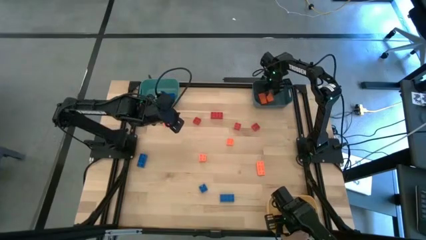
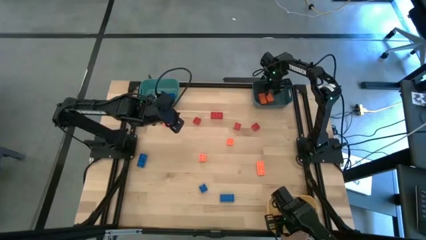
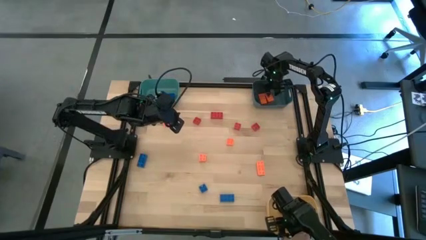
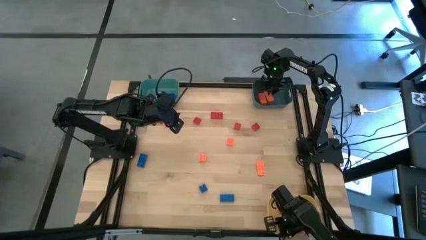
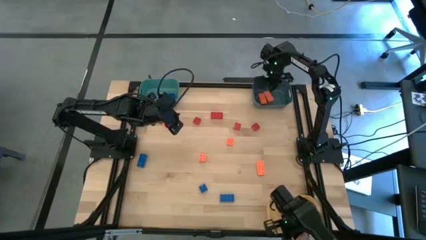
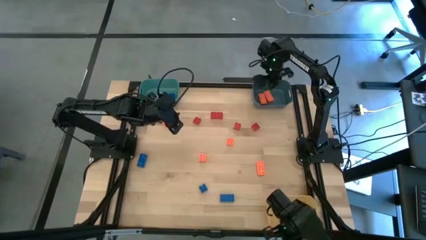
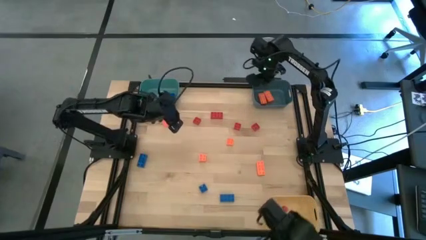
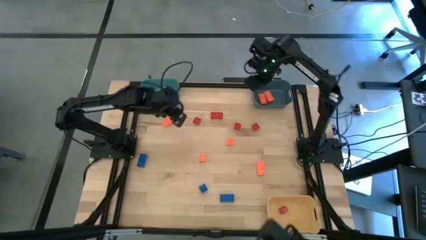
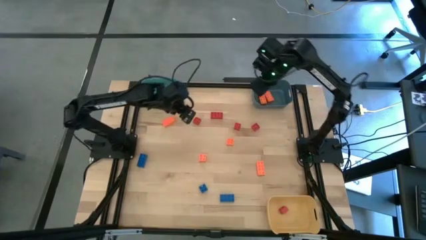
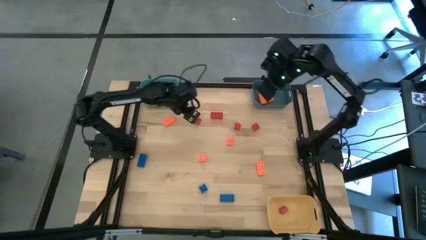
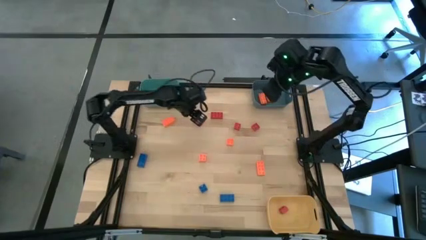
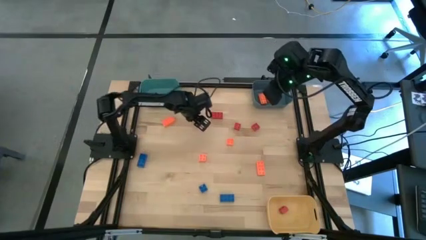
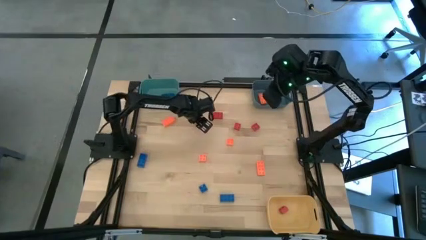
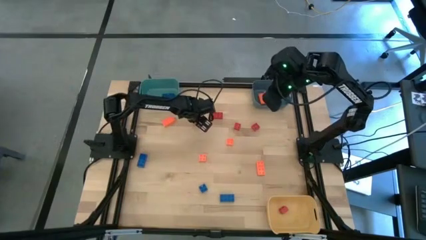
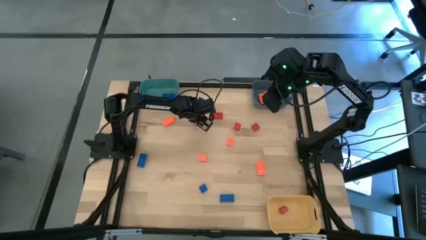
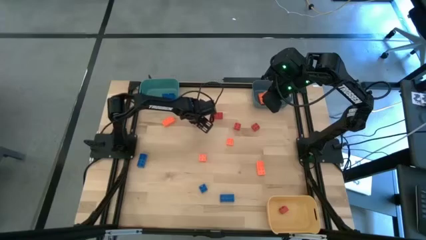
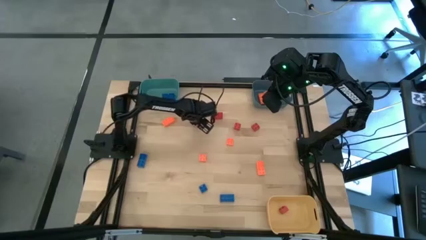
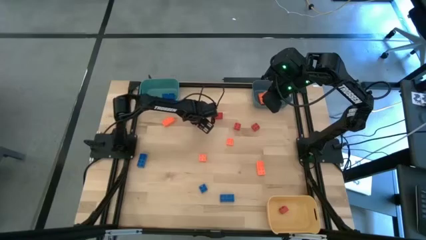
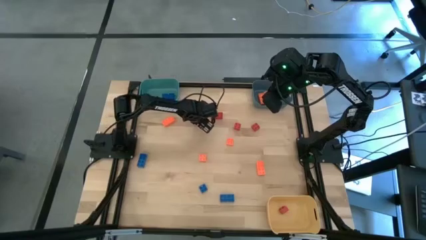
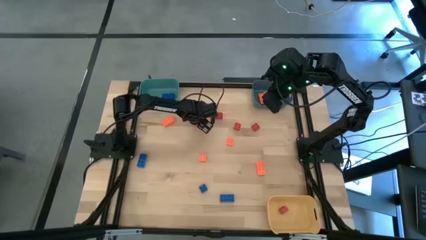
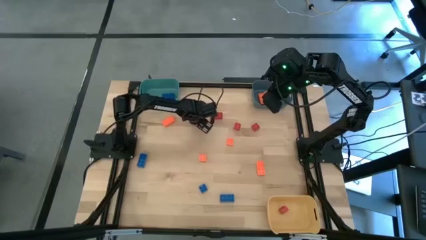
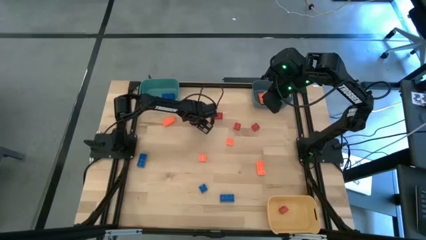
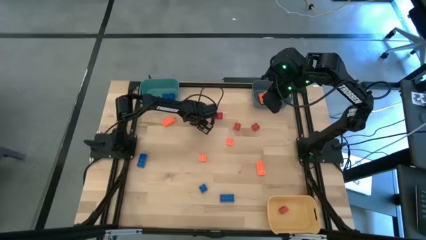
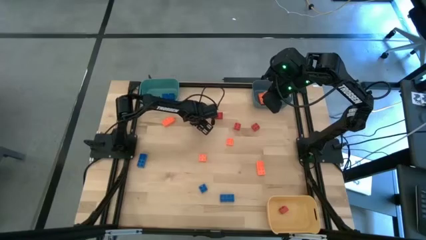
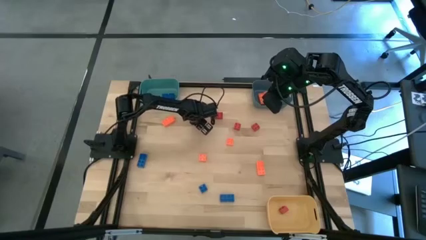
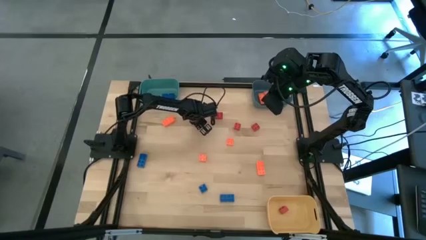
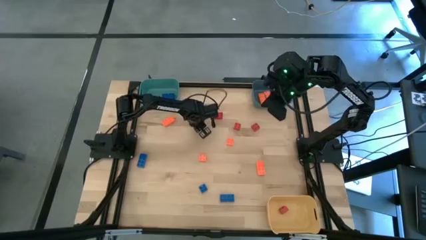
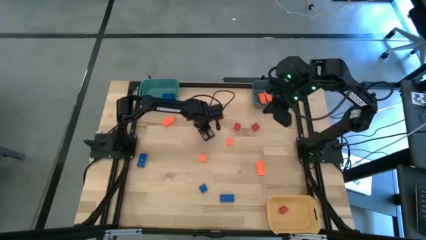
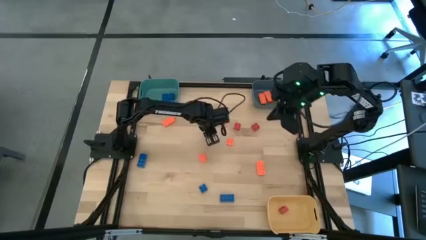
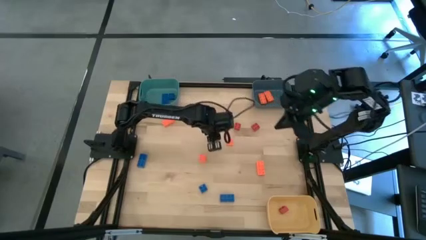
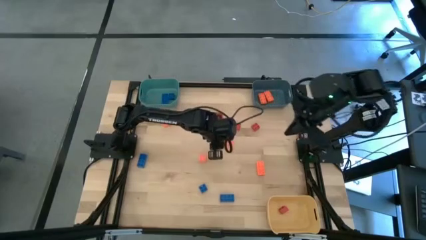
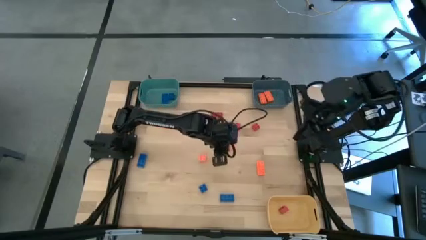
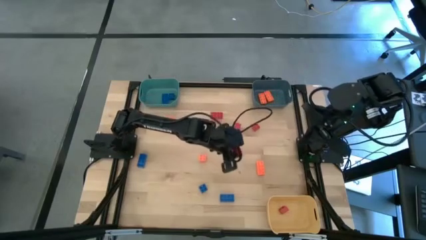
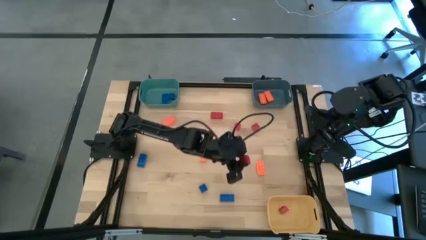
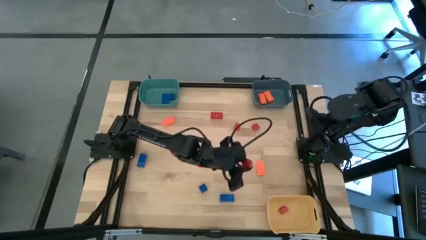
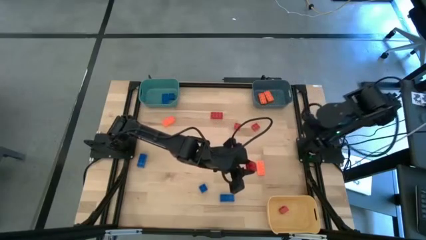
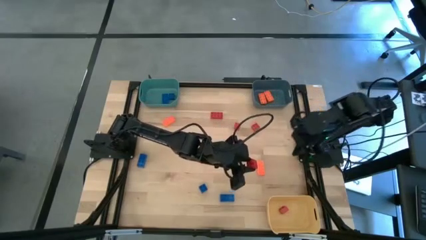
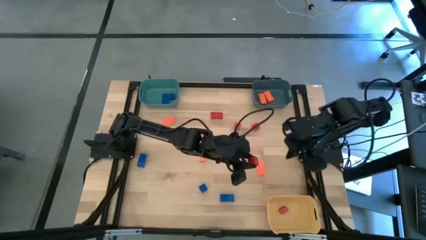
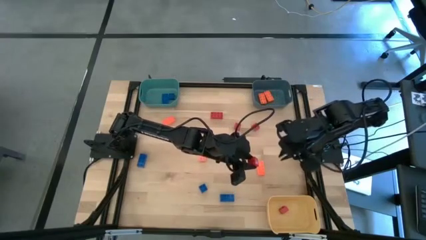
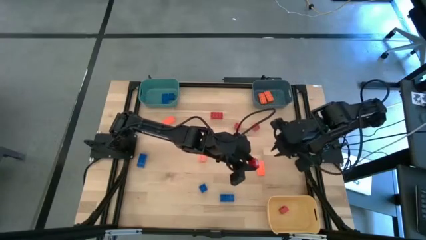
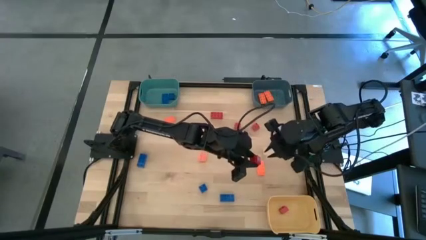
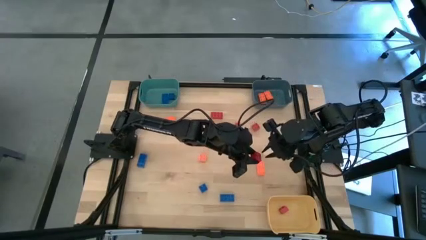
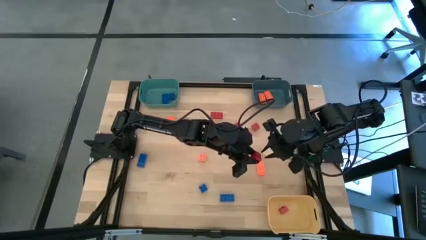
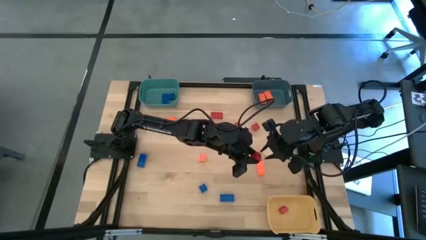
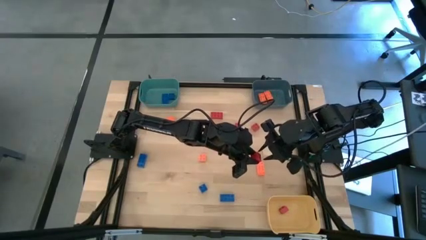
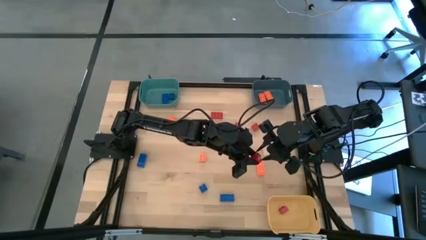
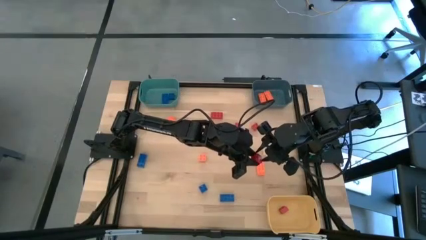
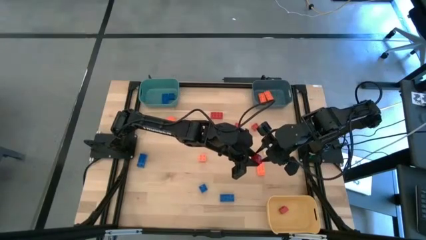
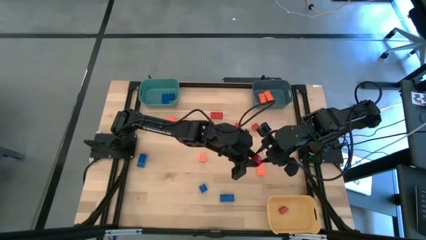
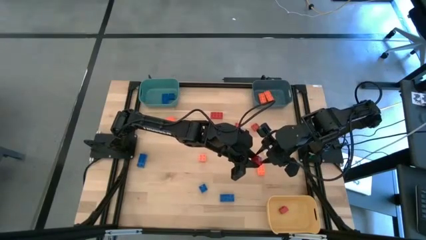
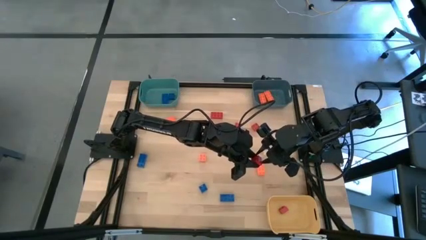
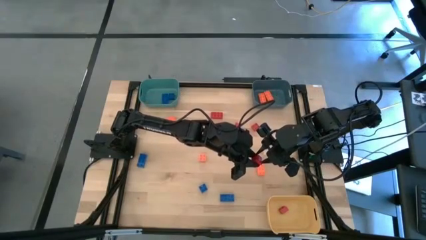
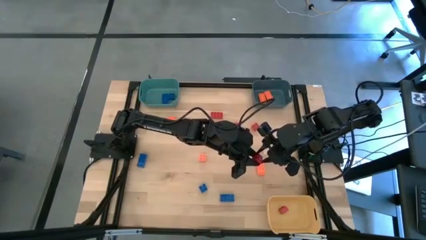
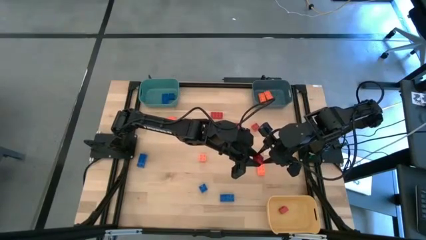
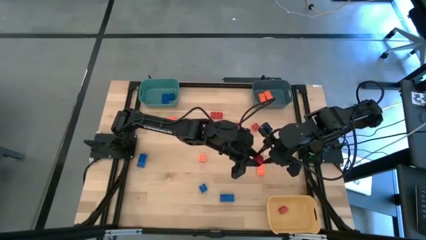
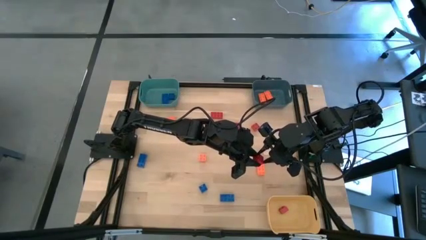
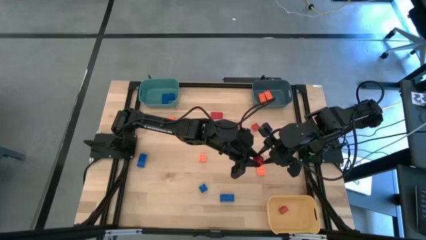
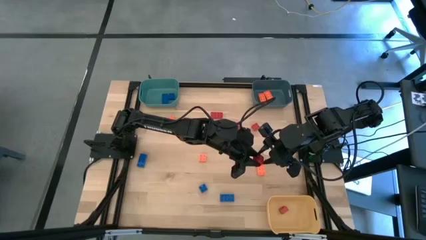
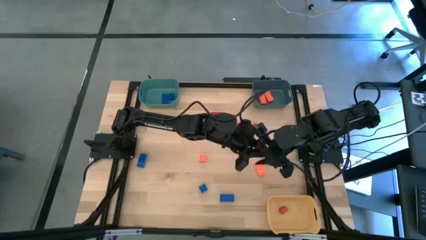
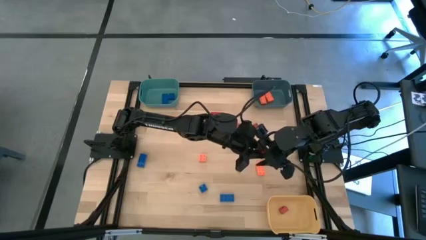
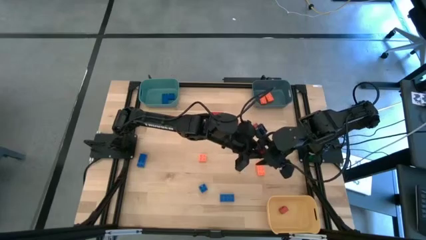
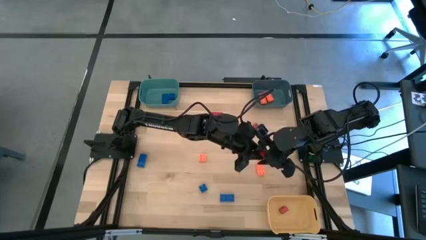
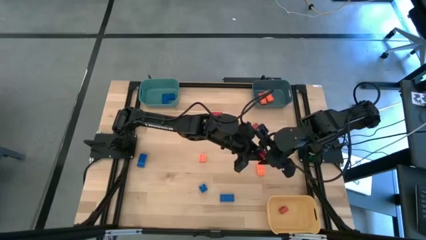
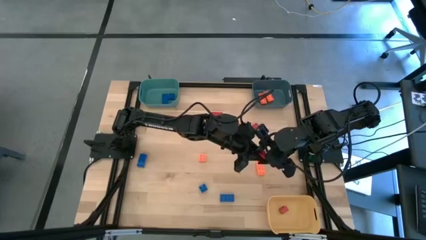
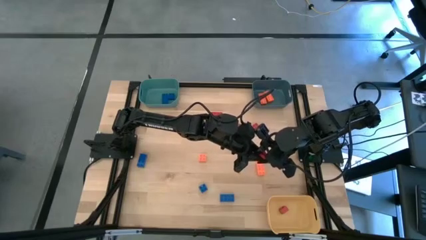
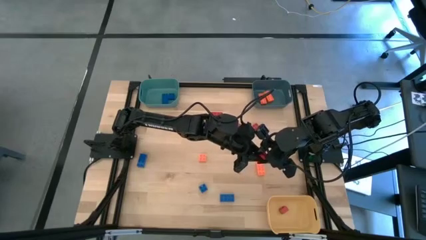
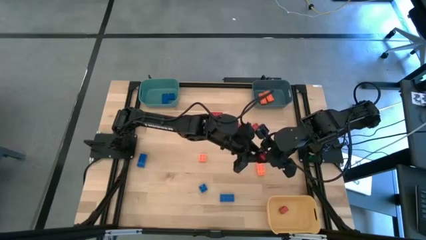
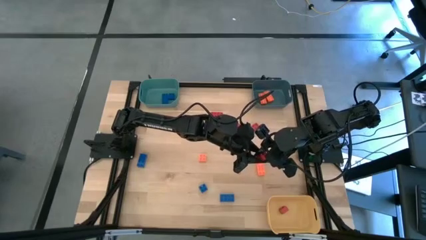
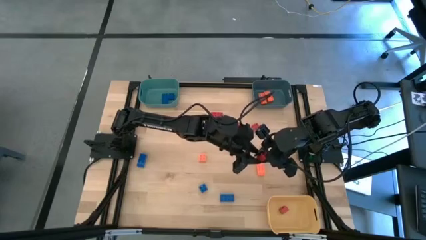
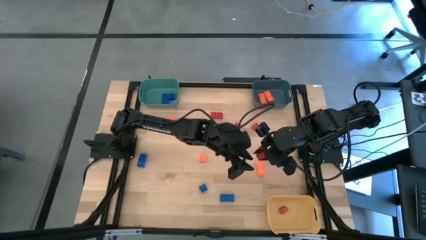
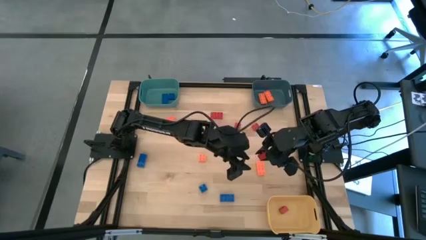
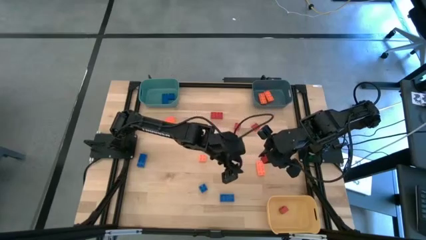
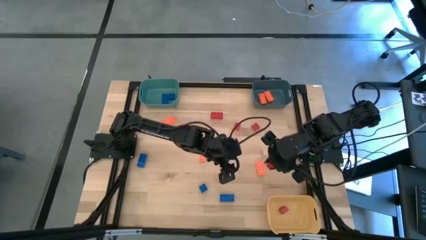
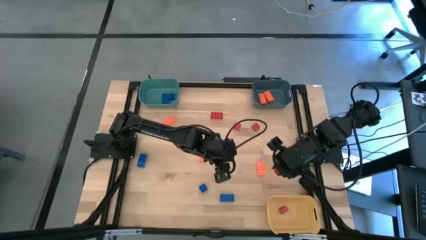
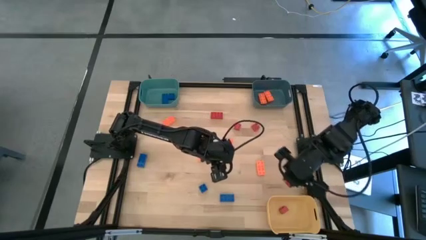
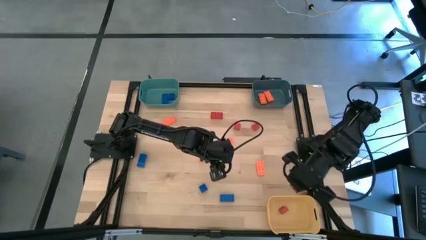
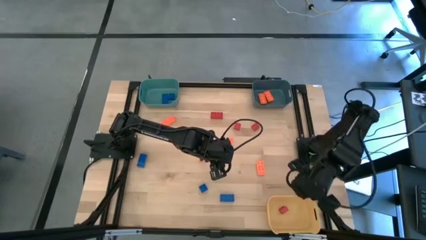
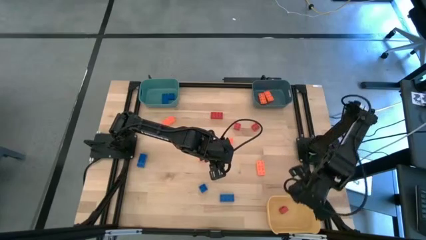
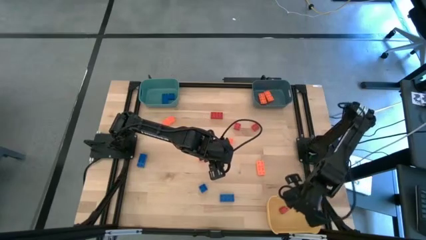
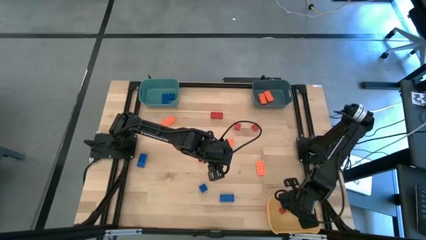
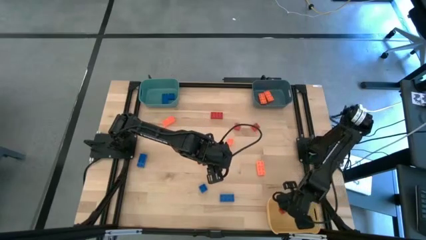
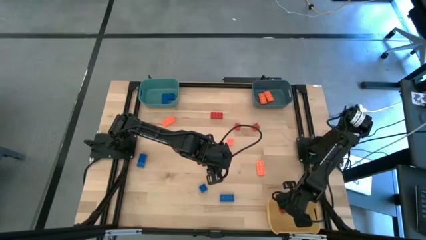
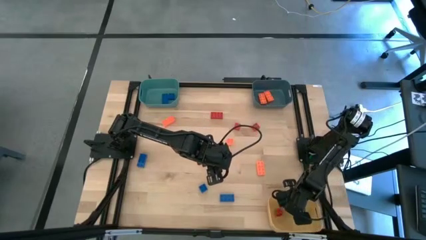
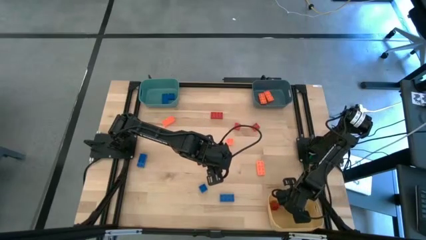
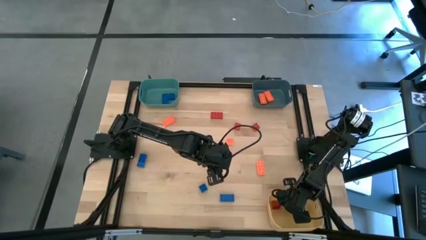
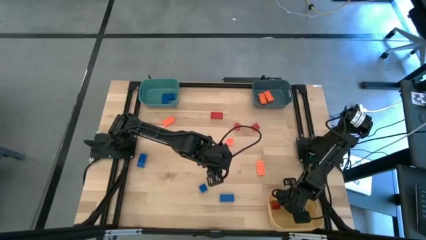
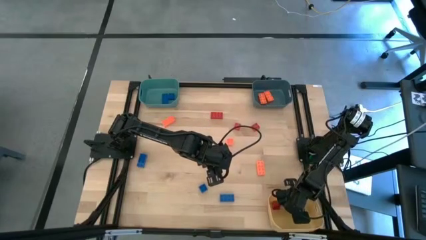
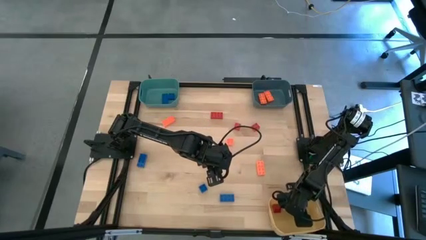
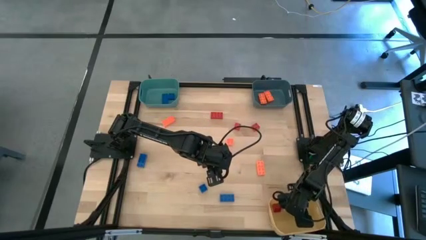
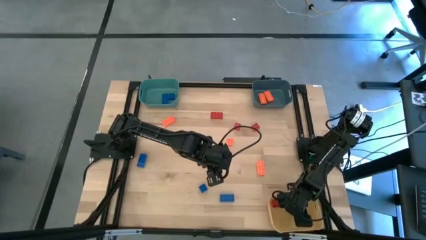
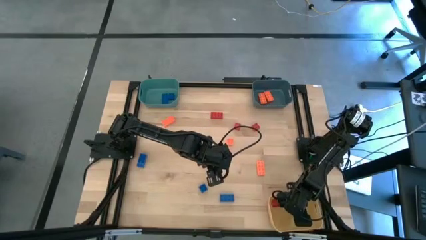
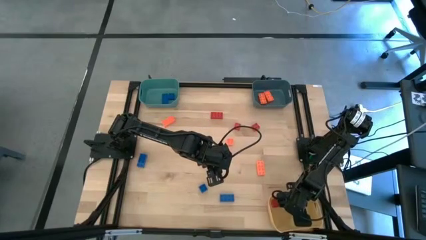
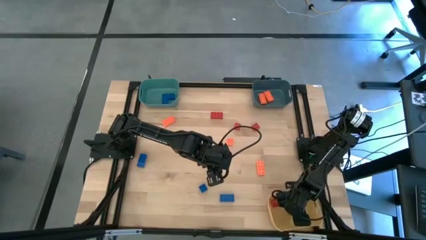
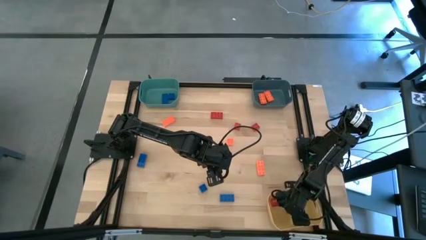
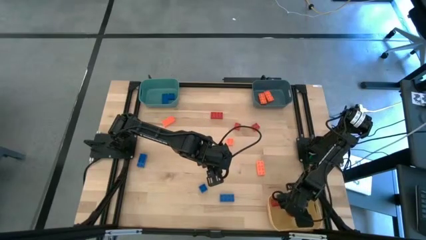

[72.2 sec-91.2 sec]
Task: Sort & place blocks by color
Put the red game piece into the yellow bin
